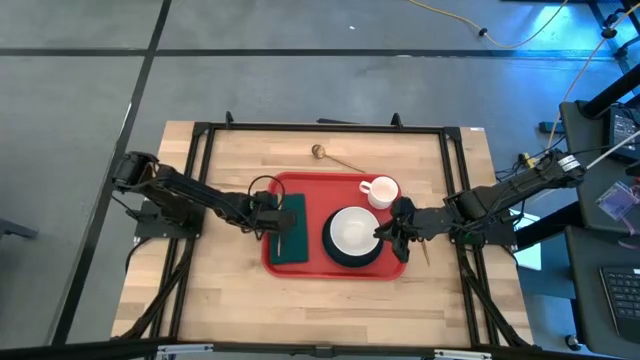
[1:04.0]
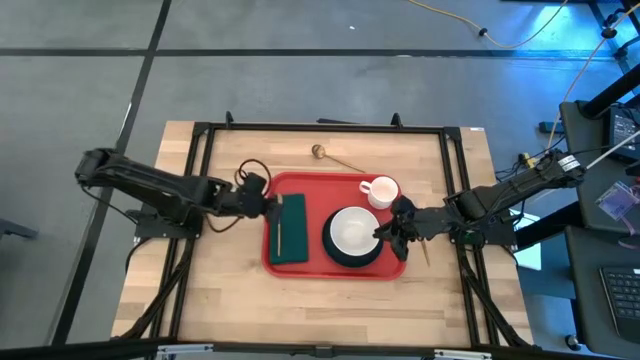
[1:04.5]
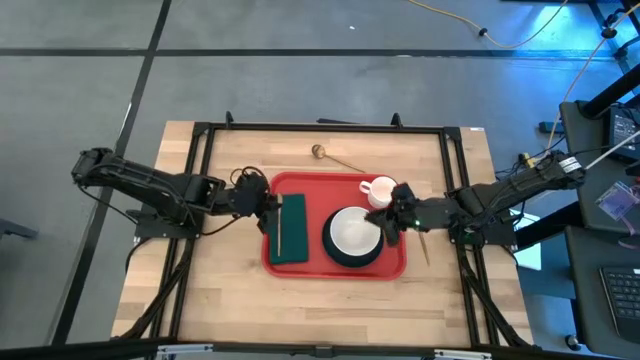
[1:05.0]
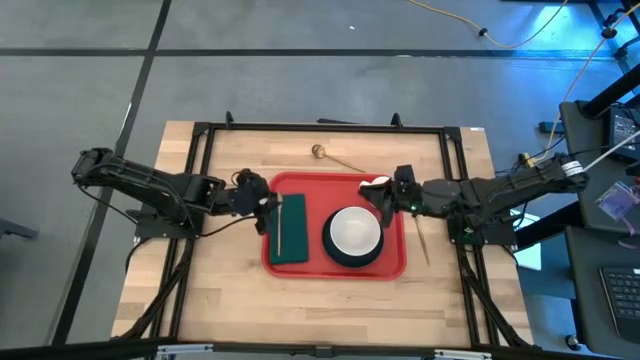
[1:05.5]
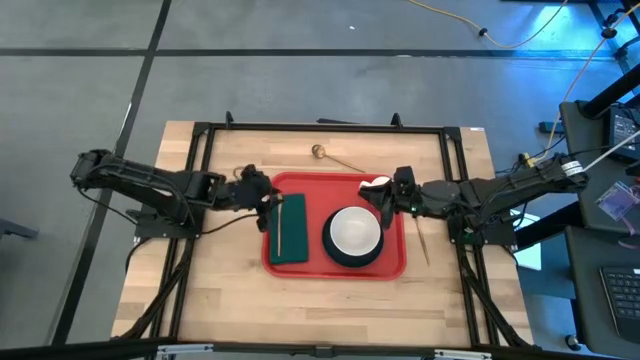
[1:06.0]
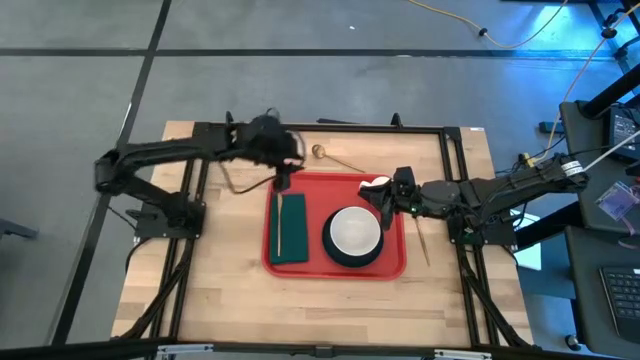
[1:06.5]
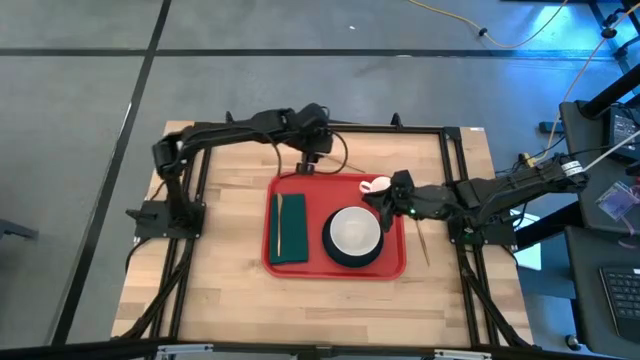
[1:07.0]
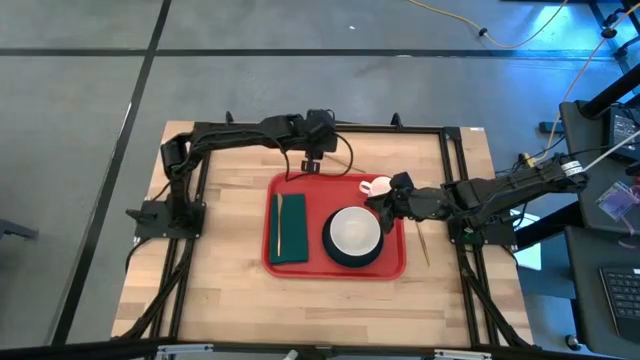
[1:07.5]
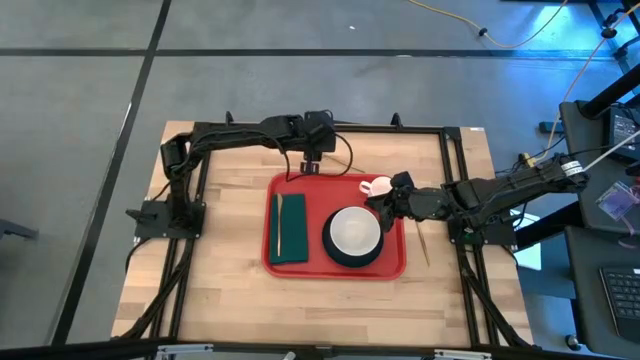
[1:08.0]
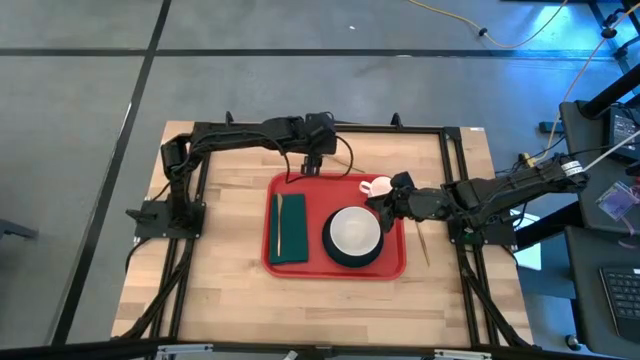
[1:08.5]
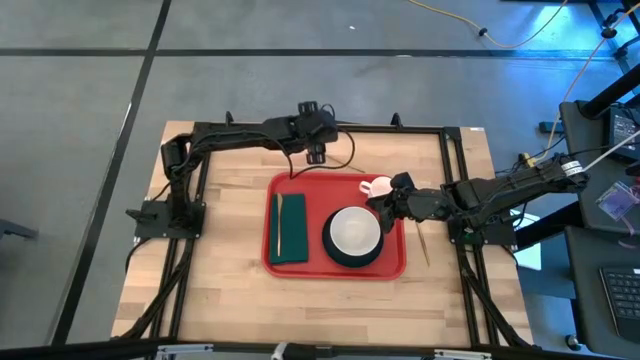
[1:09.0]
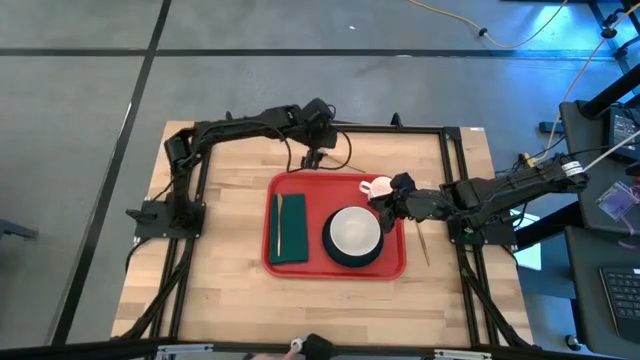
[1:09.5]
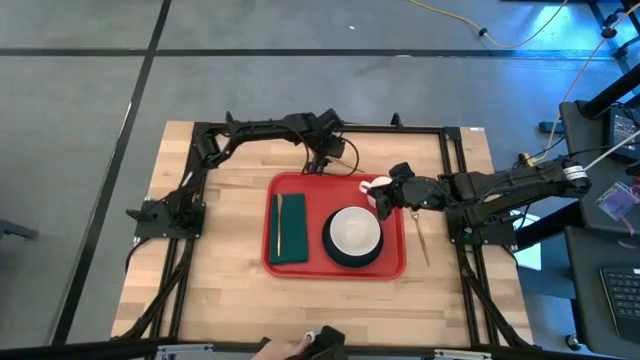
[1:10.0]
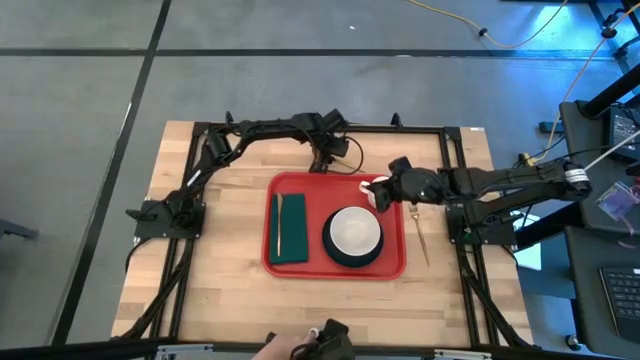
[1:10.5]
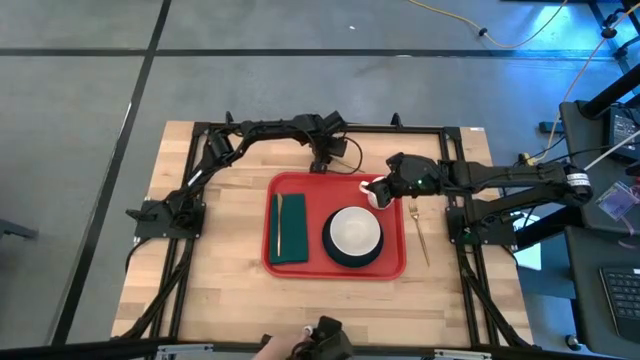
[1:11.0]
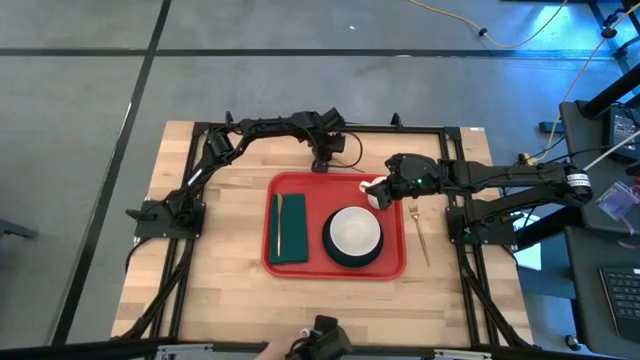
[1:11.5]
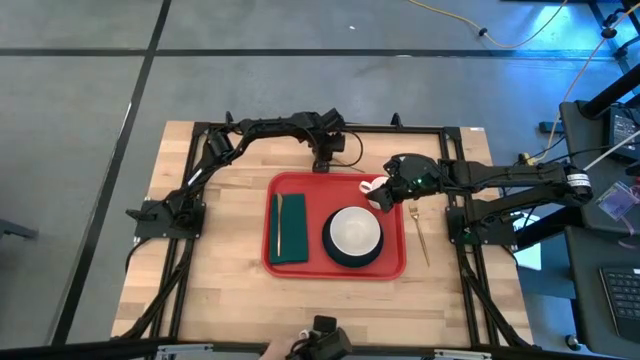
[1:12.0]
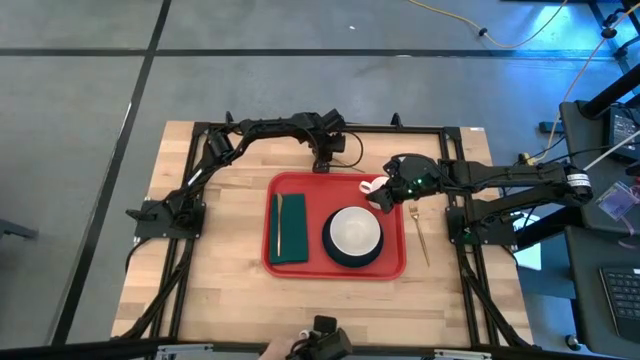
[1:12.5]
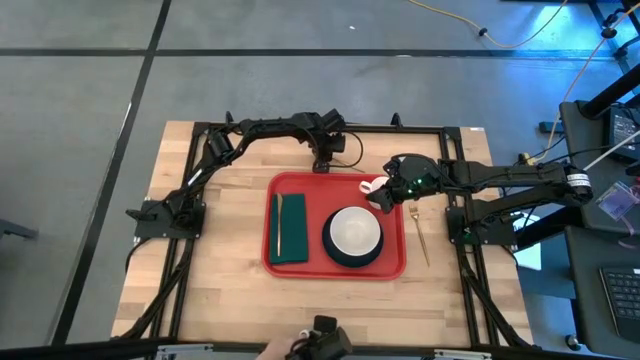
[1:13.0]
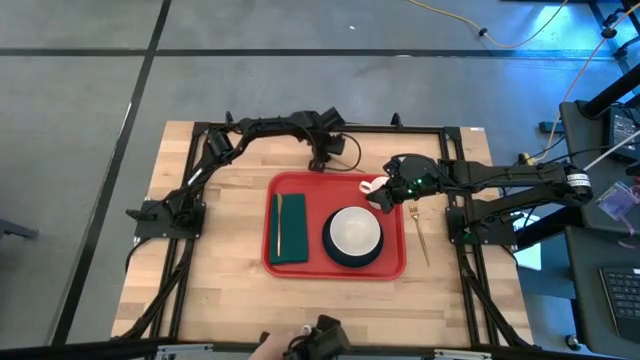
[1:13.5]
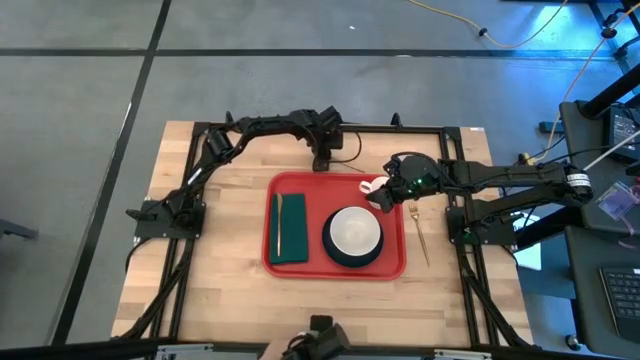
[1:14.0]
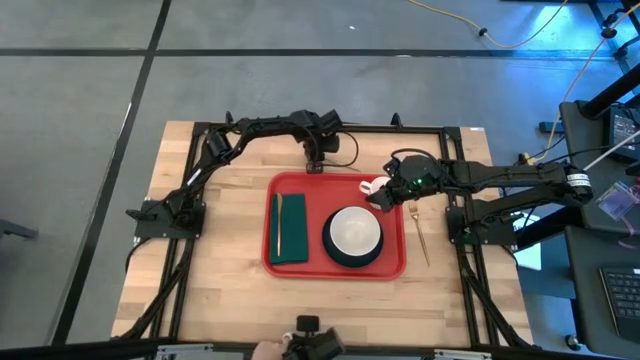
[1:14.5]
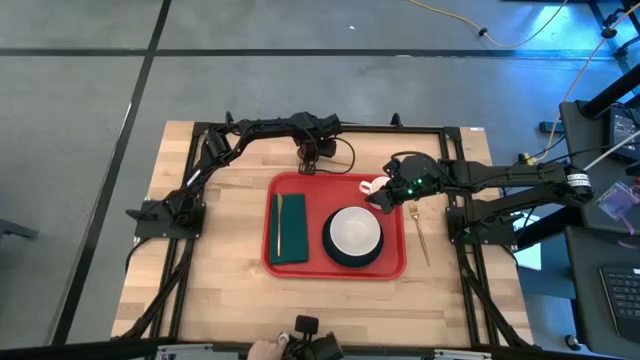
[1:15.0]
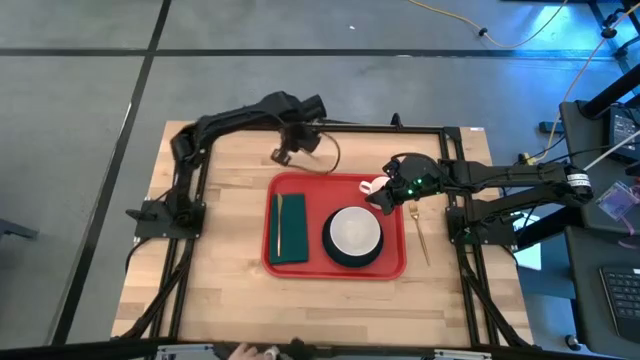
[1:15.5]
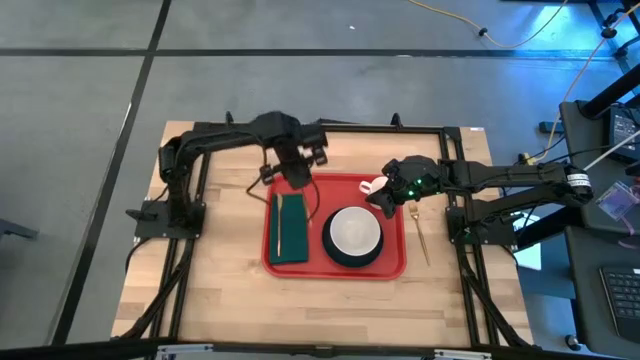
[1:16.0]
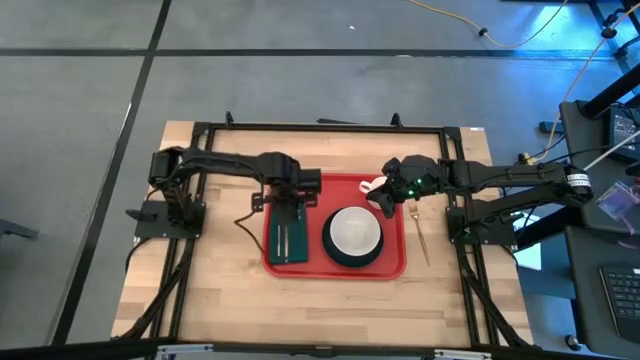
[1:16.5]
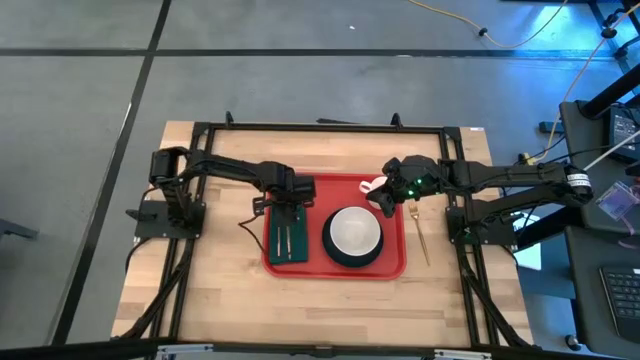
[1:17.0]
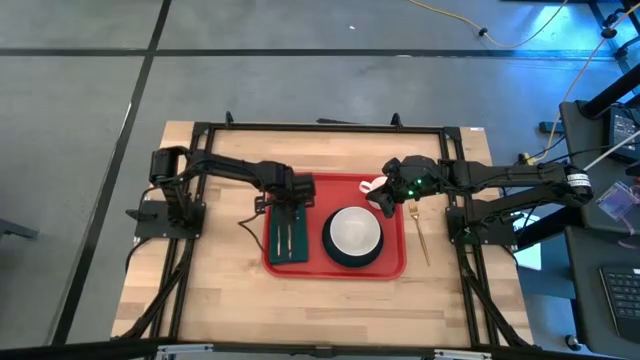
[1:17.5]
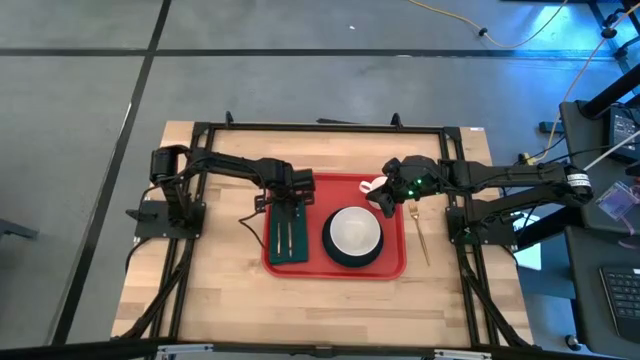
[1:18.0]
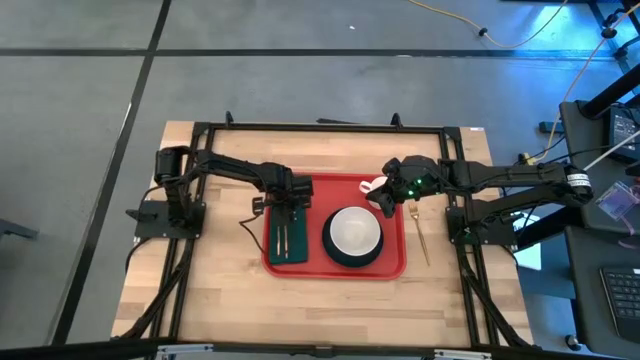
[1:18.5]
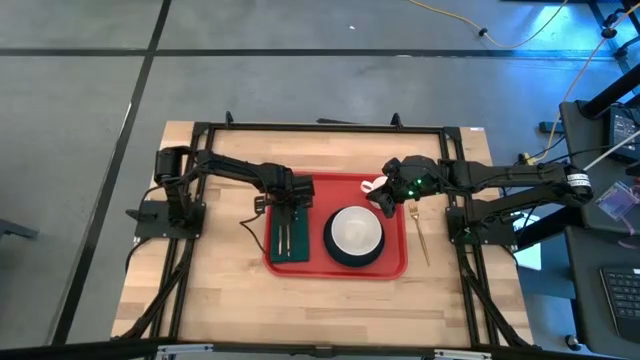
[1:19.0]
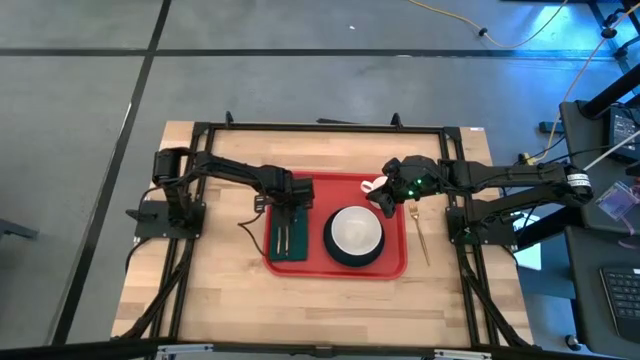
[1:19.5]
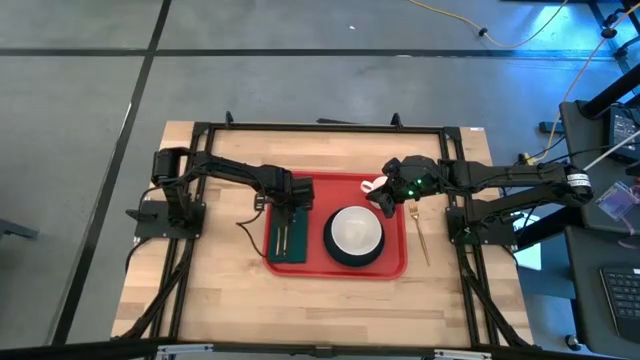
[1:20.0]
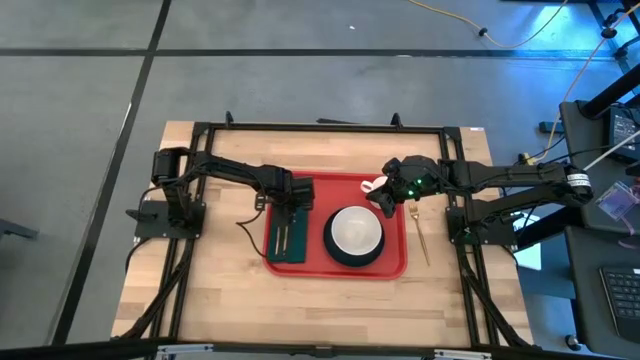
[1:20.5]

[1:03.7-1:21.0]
Task: Set up tray
Put the gold spoon on the dark green napkin to the right of the gold knife

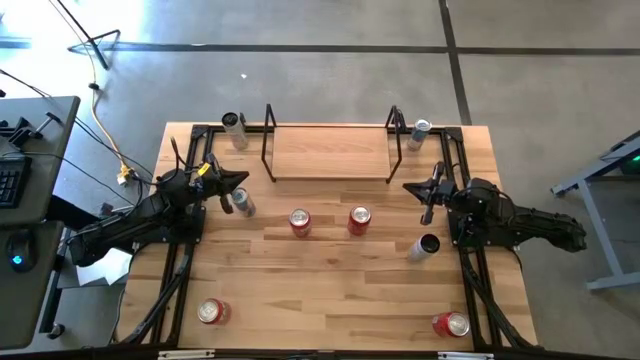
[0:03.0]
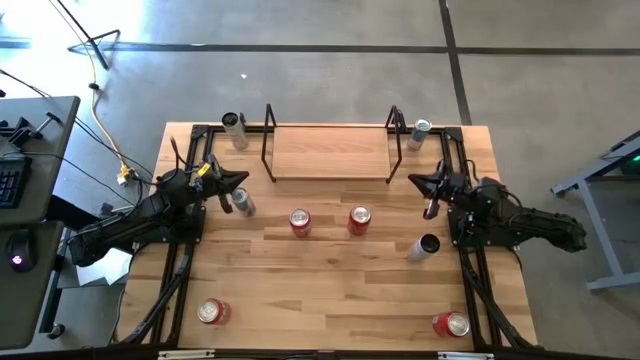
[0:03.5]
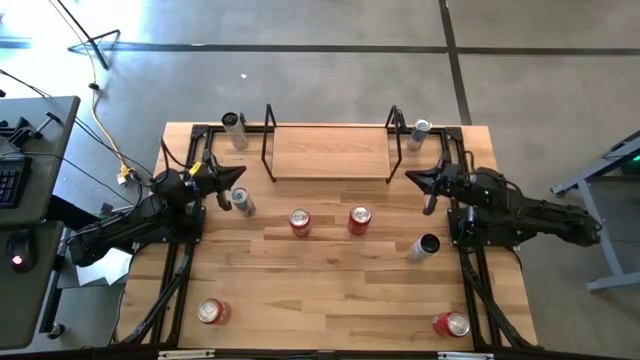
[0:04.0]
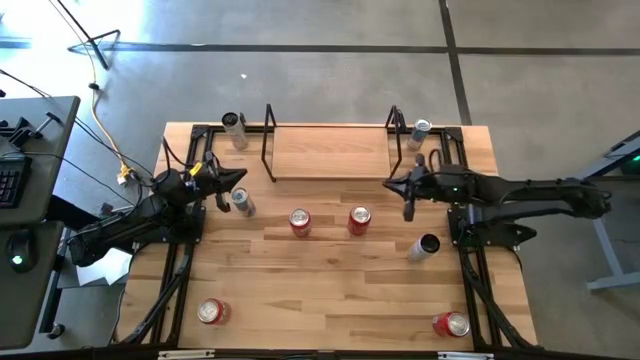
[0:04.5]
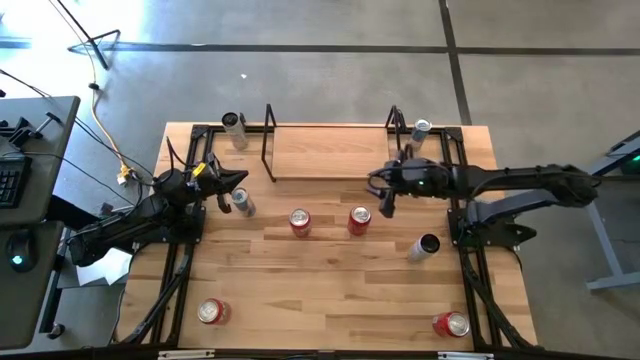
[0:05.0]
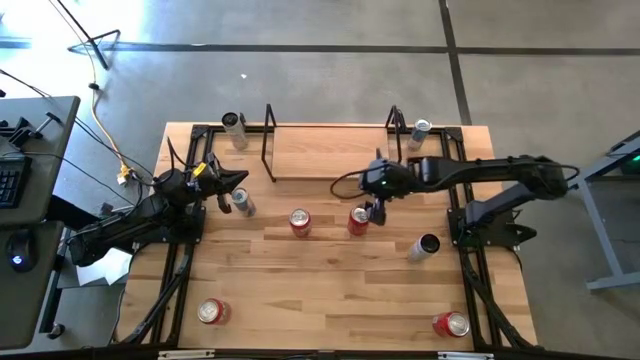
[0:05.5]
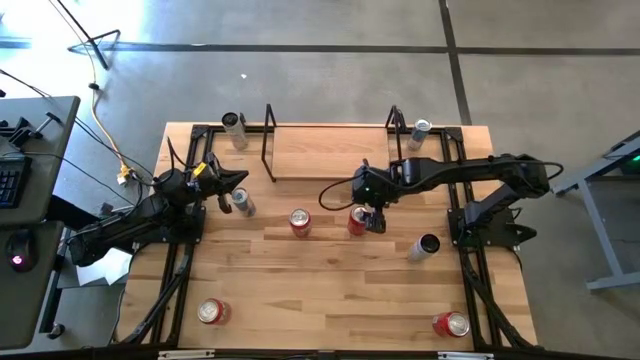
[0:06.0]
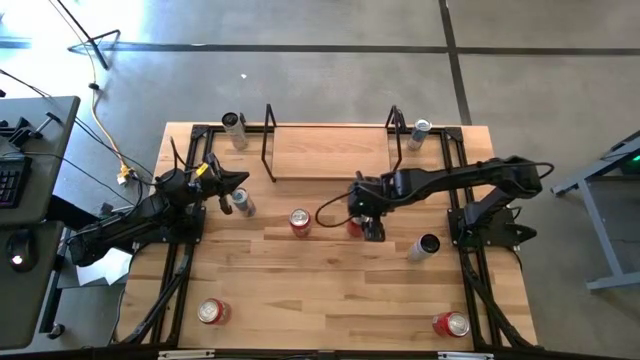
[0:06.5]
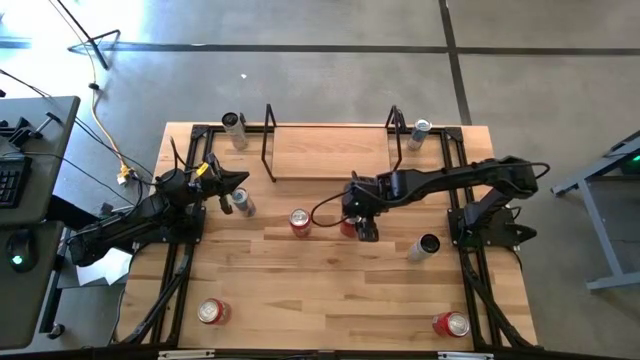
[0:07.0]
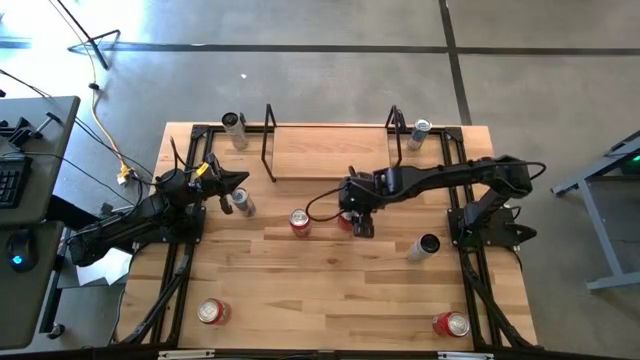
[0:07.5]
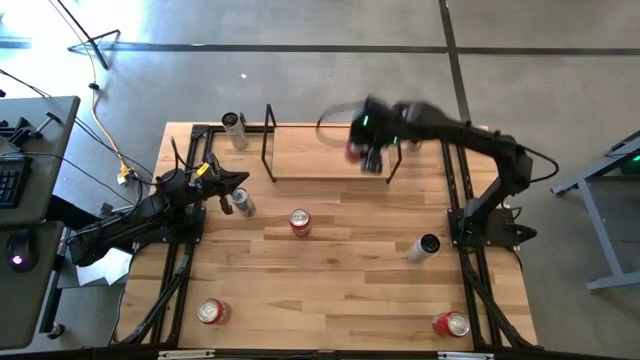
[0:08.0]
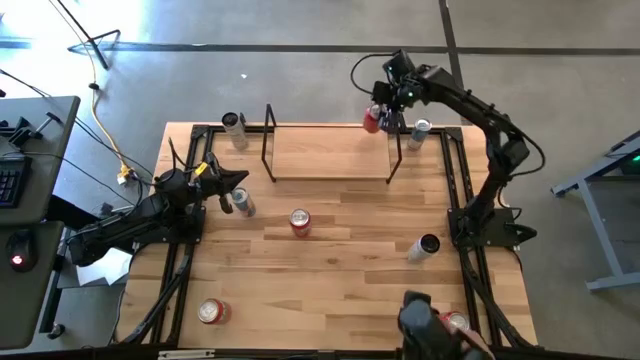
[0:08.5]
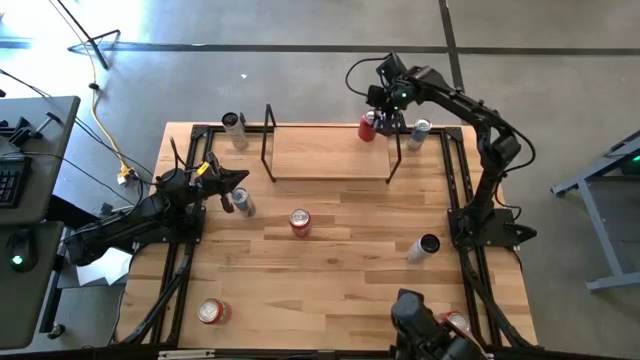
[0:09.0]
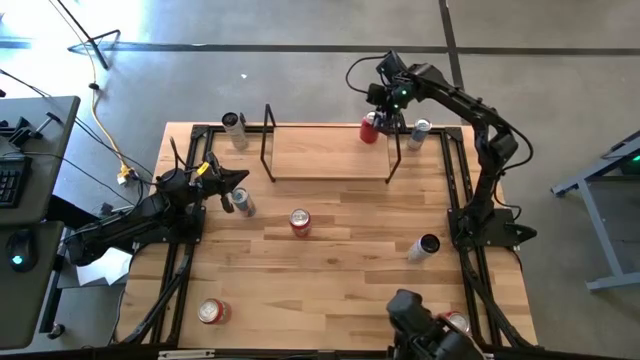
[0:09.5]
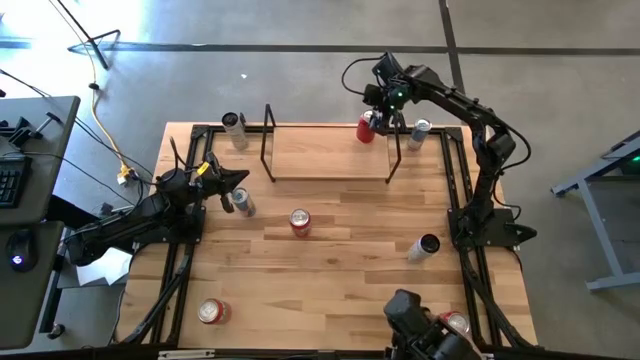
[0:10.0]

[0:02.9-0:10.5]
Task: Place canned beverage on shelf
Put the top red-black soda can on the shelf
